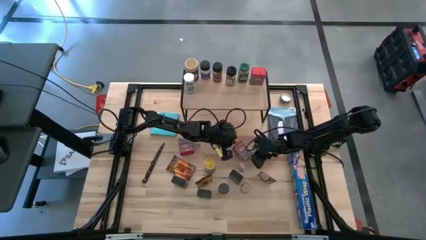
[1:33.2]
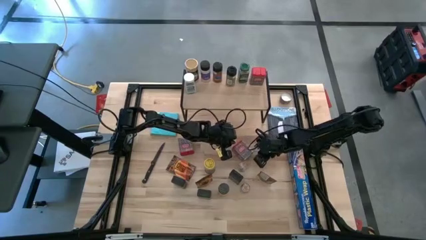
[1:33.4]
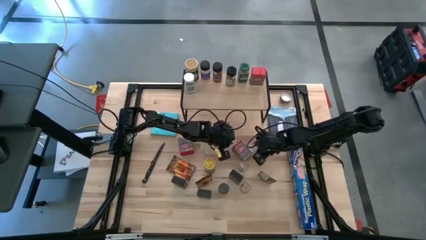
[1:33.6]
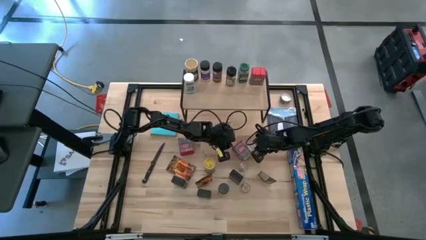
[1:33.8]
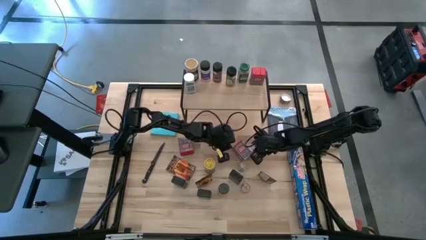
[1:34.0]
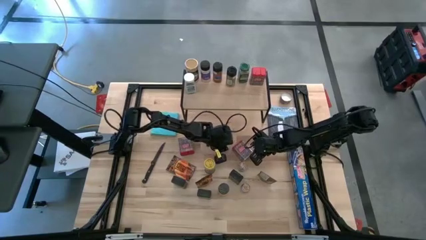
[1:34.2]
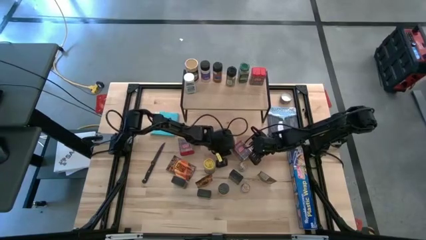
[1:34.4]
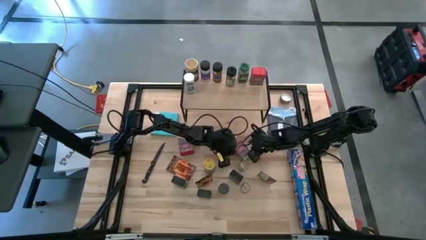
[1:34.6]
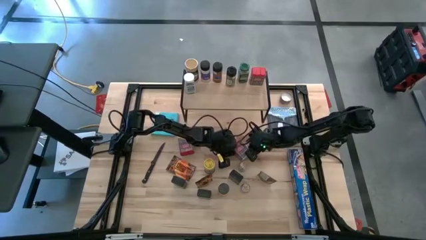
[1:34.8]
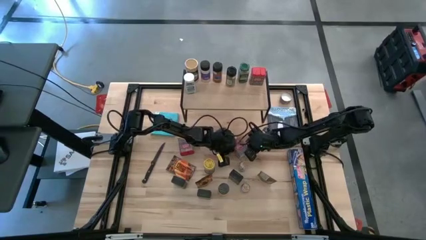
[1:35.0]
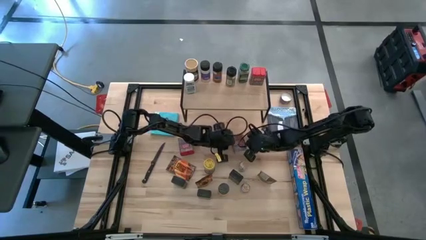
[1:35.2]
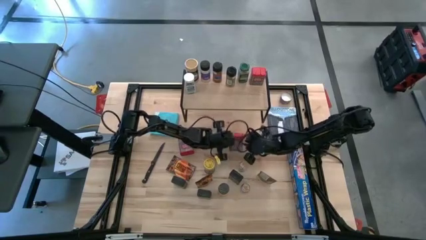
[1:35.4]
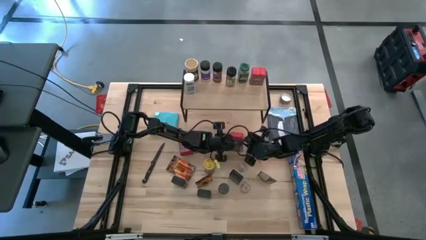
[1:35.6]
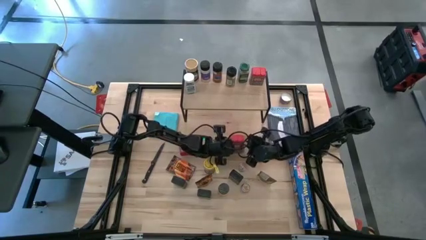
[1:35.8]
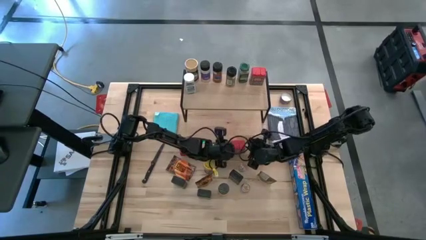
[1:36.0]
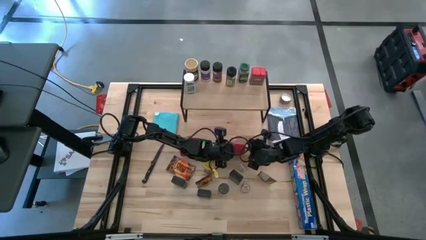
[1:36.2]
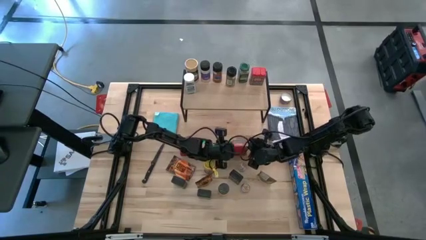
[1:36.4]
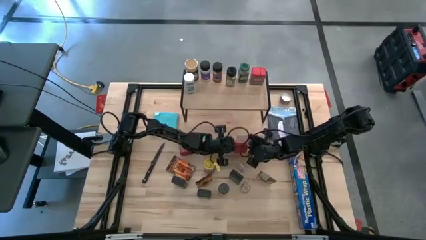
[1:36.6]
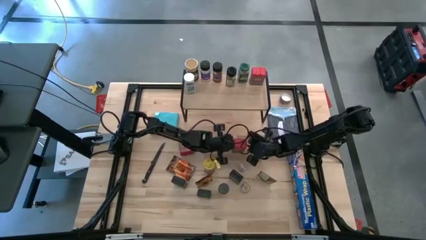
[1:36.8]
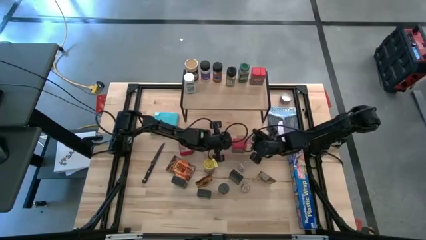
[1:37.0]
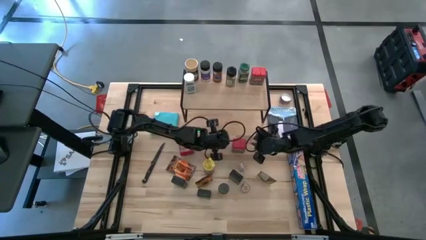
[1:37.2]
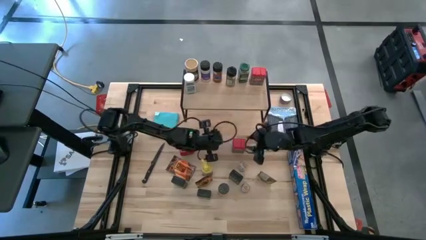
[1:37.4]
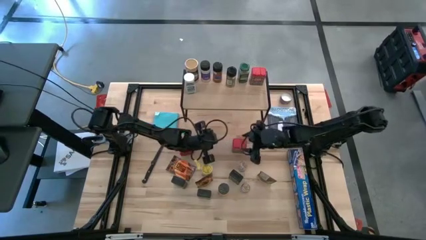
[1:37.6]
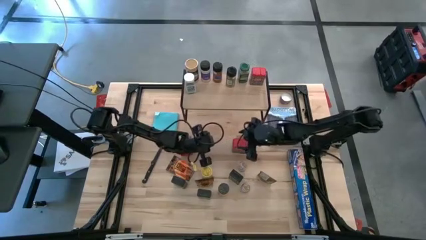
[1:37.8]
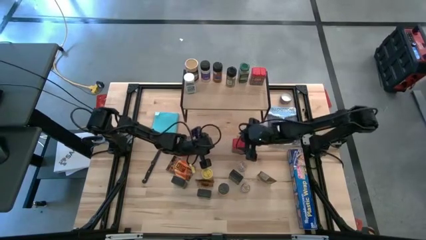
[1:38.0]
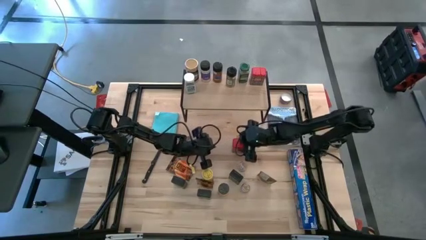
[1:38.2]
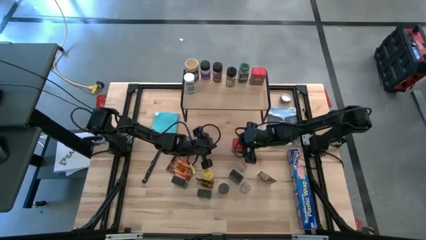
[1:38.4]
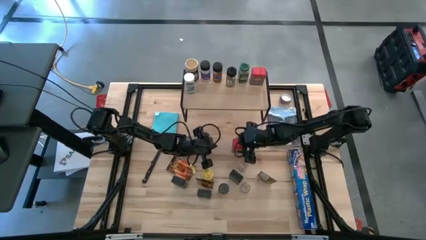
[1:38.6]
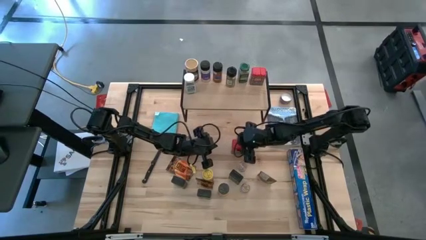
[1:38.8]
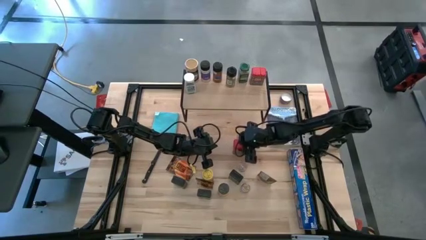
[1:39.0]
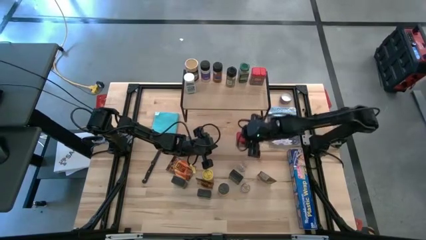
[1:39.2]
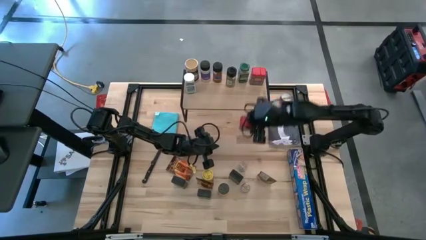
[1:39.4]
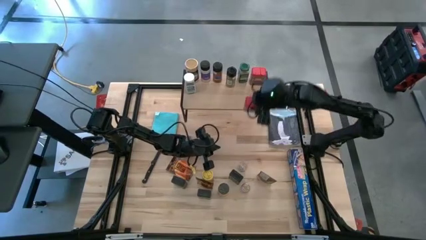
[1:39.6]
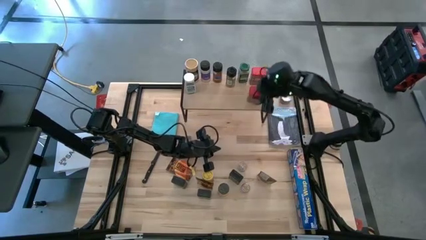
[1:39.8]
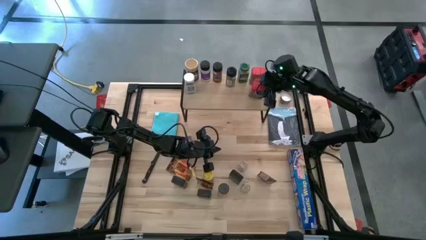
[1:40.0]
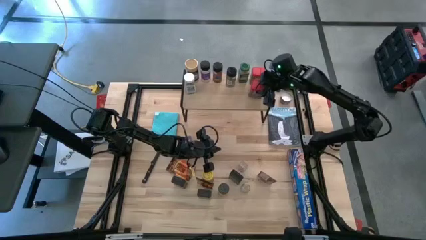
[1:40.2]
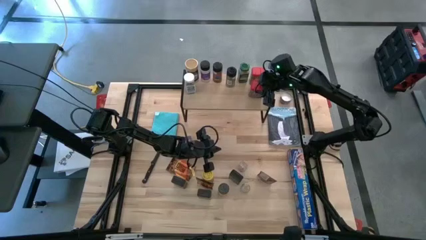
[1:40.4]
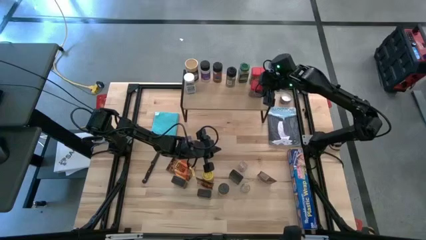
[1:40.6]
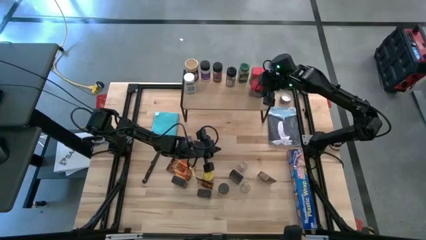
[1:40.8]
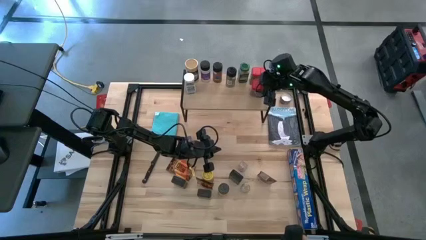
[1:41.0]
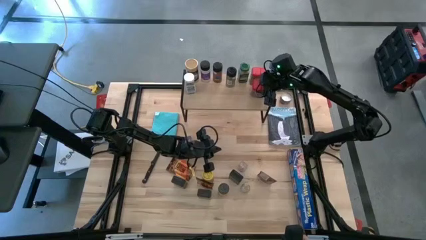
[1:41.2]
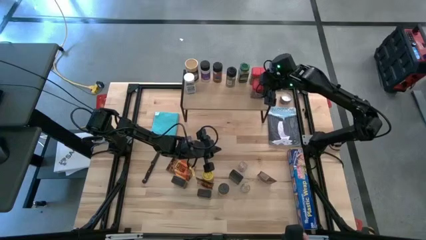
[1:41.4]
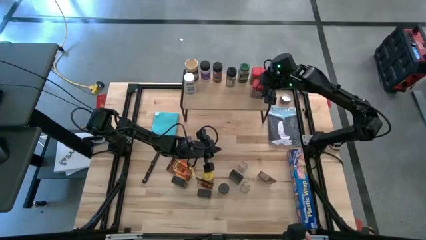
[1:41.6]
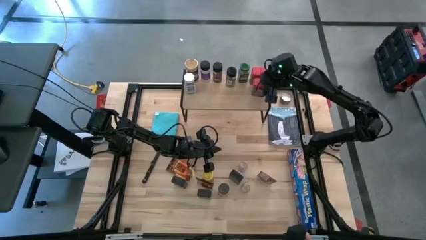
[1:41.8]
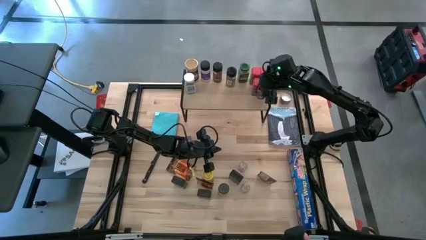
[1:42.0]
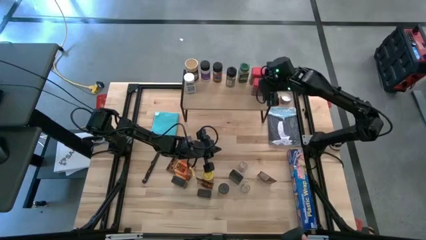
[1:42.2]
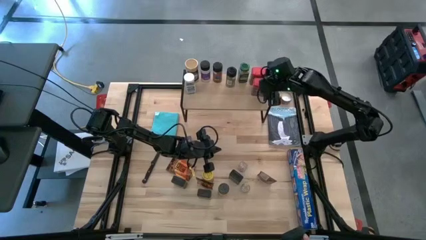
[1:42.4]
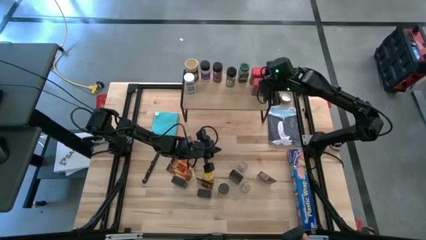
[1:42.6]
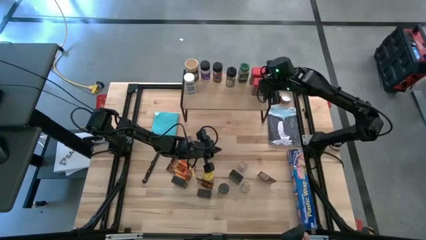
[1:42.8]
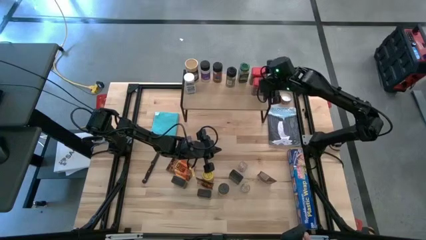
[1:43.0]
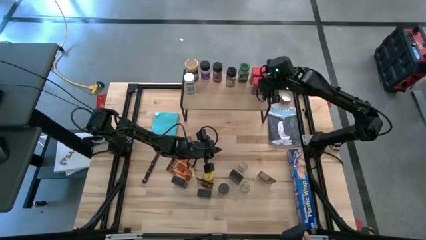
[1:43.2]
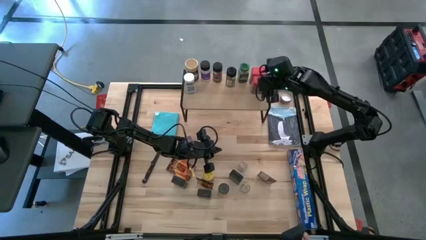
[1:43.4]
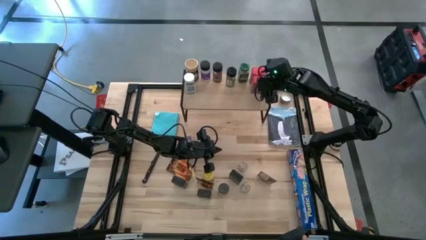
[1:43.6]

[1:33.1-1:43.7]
Task: Shelf spices
Put the red seasoning can on the shelf aligned with the other red seasoning can

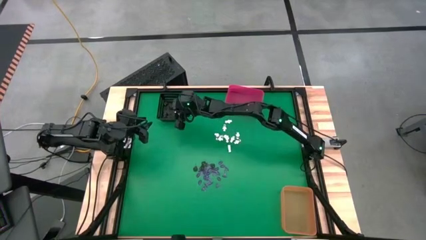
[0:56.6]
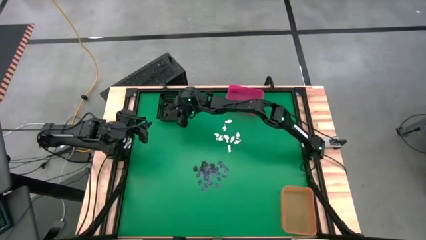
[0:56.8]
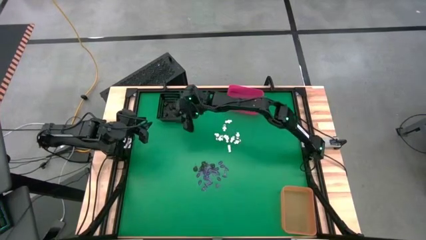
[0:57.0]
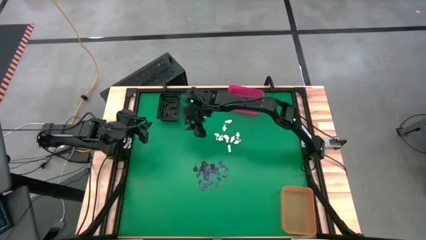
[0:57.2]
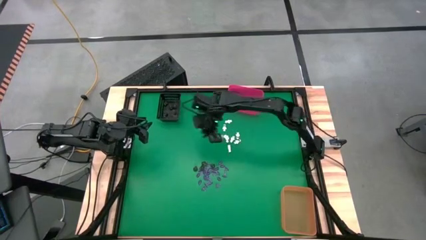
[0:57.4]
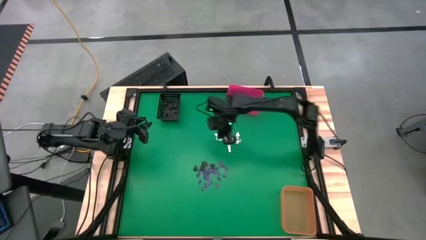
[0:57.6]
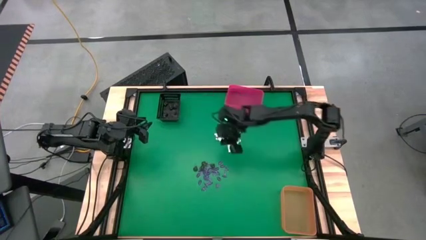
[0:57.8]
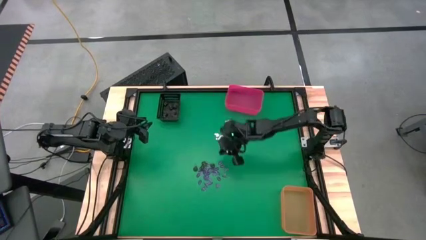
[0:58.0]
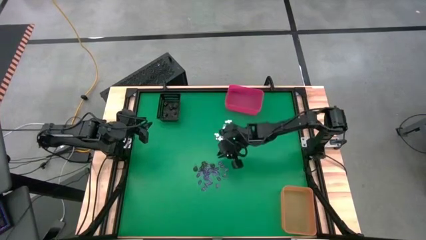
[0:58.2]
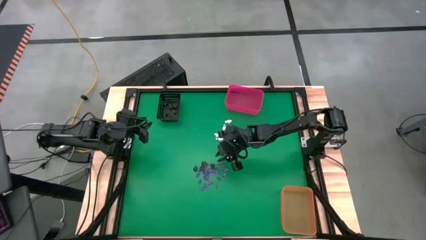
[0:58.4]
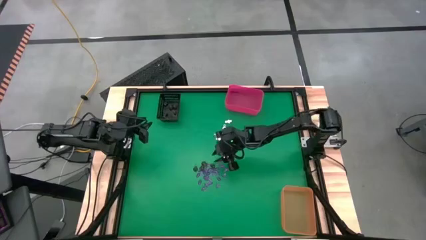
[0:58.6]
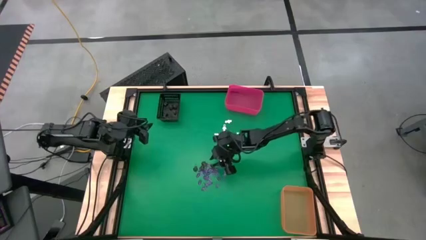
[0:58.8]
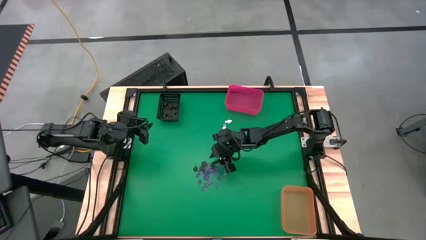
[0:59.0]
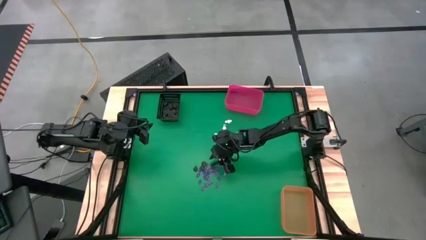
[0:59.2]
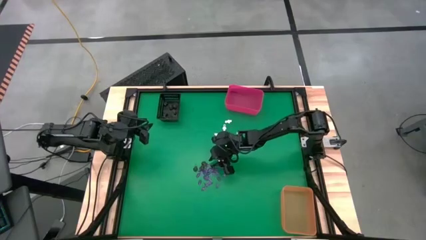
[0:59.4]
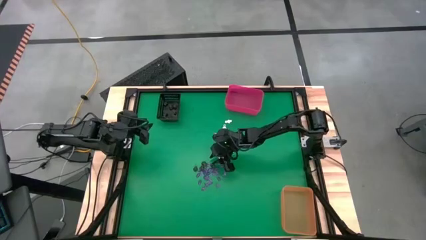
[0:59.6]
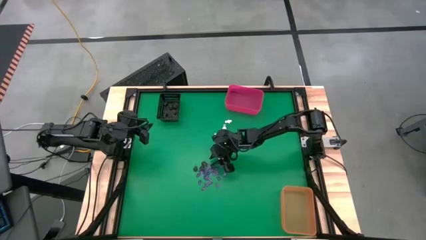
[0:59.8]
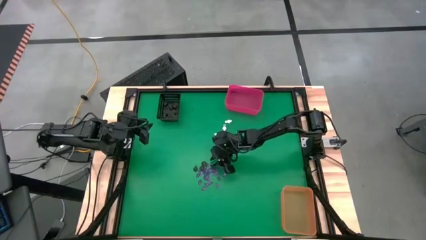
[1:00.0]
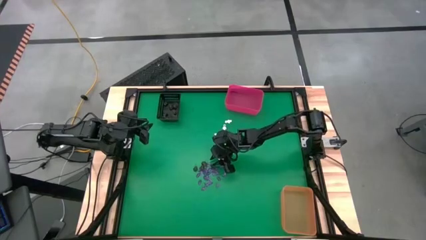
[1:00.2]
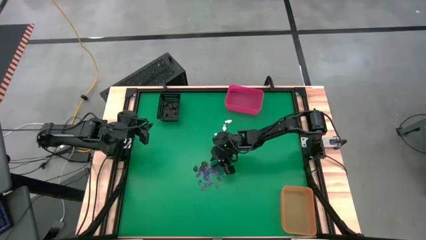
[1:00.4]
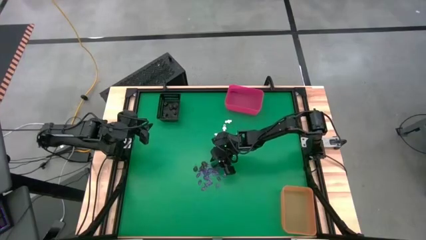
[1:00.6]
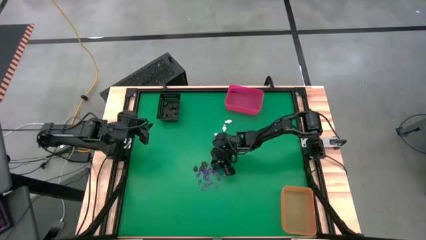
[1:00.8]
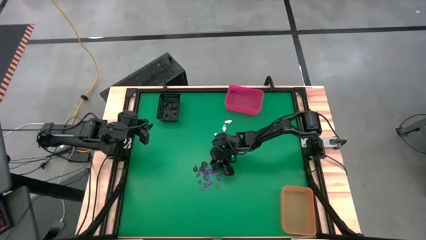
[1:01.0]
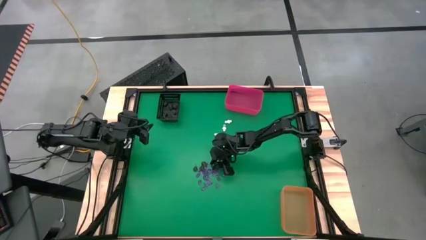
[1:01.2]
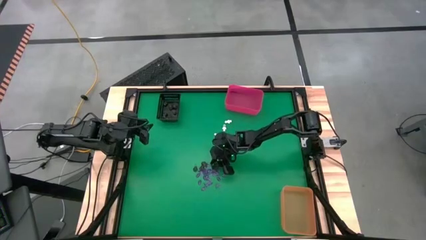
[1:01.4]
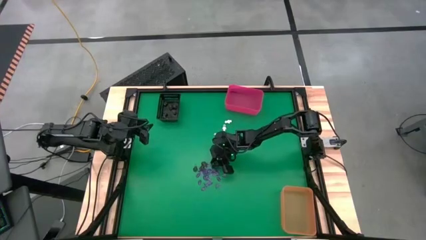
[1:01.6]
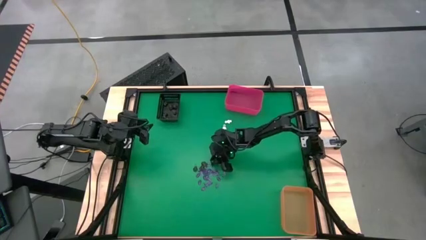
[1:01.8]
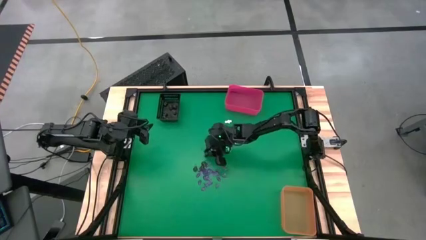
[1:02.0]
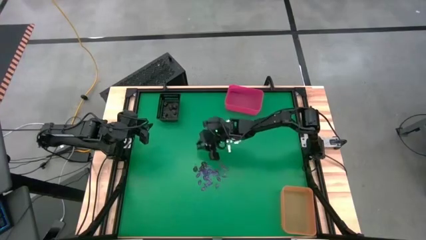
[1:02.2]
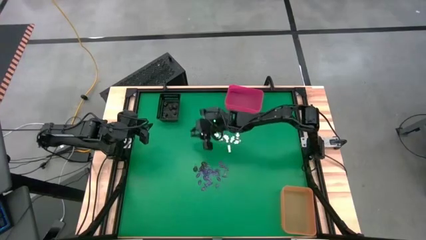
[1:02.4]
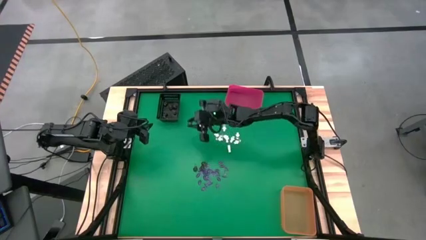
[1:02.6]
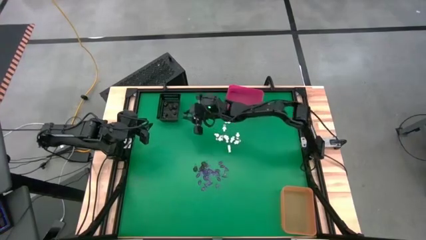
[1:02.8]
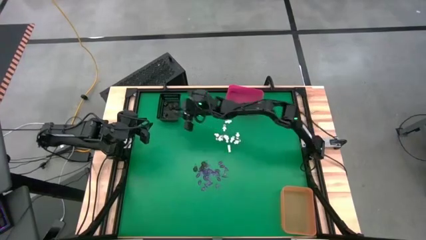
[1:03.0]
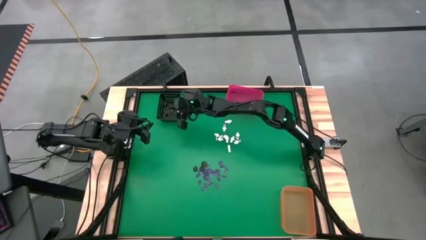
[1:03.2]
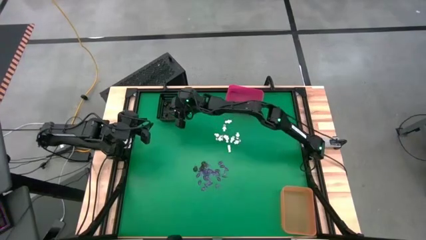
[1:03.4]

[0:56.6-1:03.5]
Task: Sort Halloween decoration
Put the brown skull toy into the black bin
